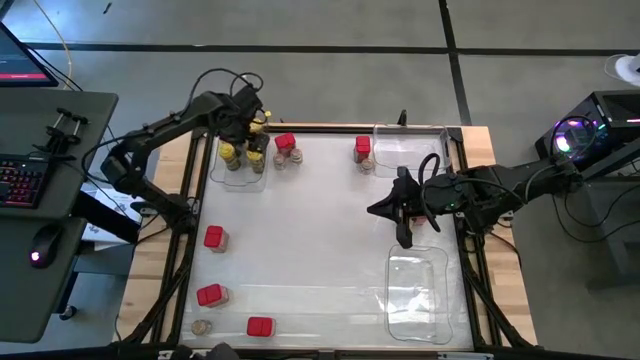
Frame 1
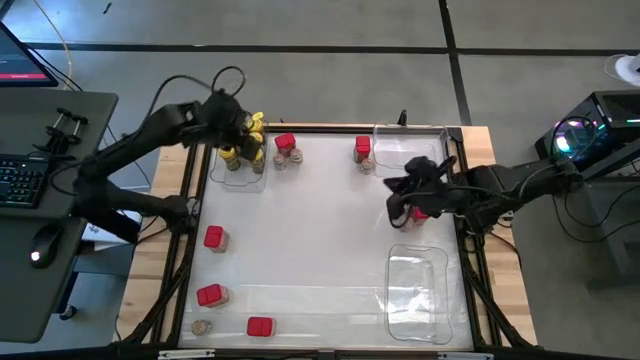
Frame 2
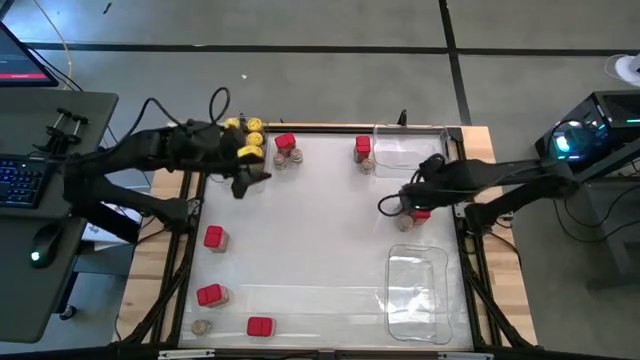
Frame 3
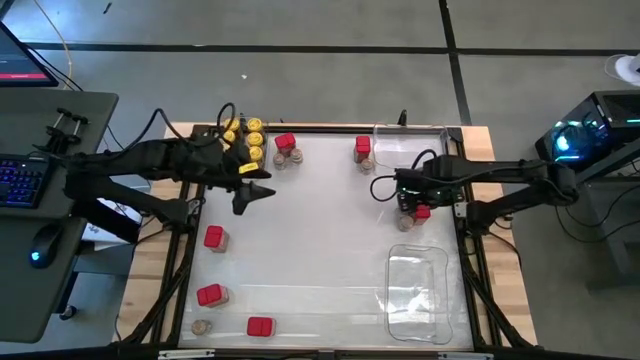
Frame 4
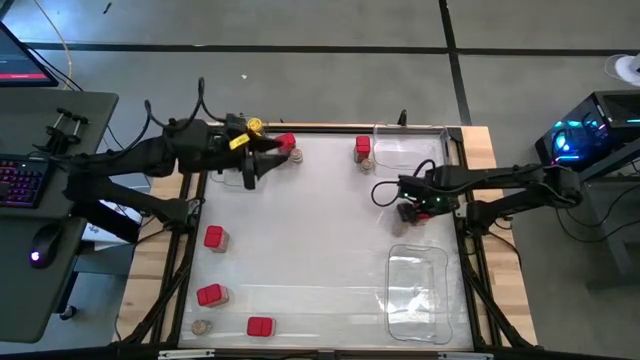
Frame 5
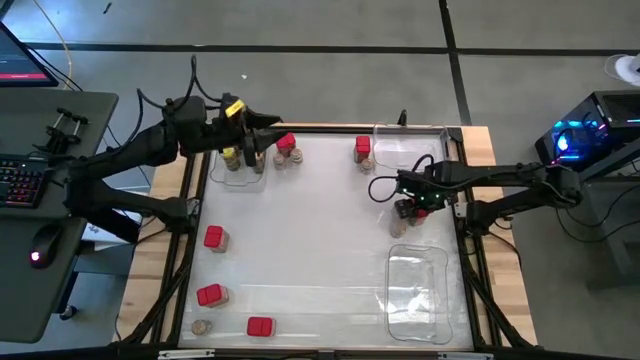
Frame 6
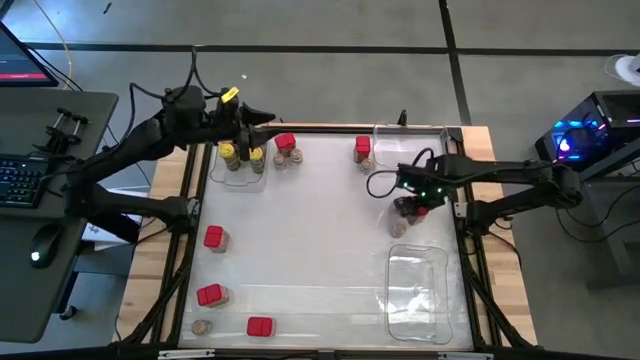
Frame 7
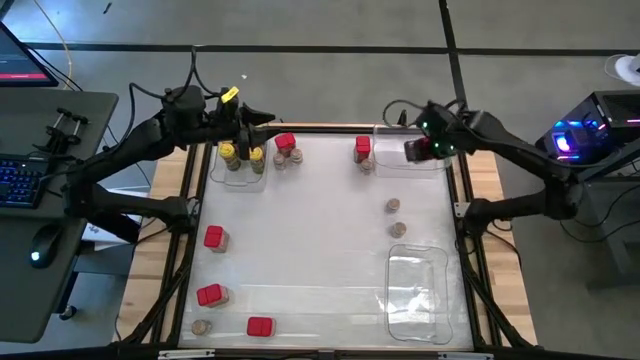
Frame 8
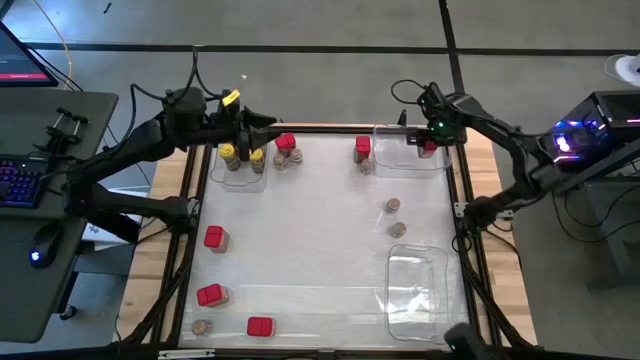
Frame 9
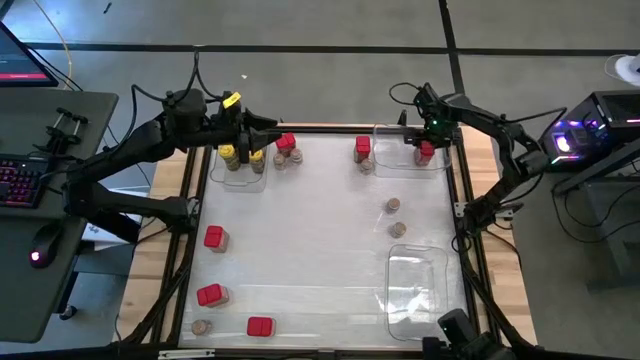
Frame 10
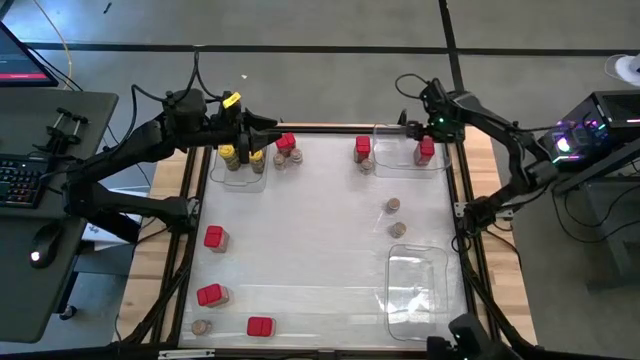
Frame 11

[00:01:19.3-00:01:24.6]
Task: Sort spices by type
Put the red seasoning can into the top right transparent bin

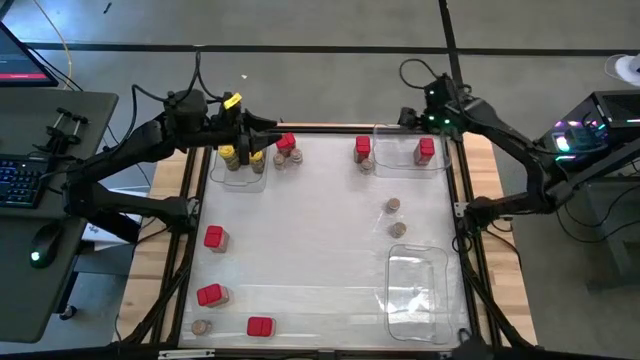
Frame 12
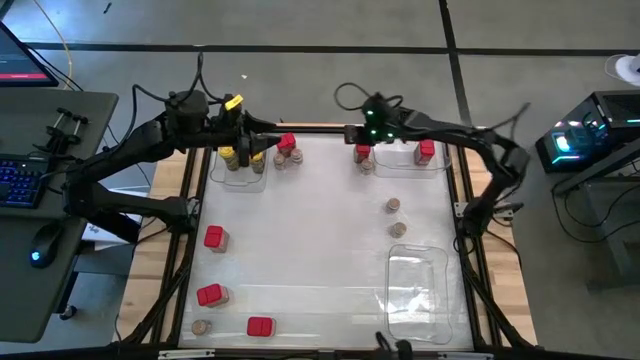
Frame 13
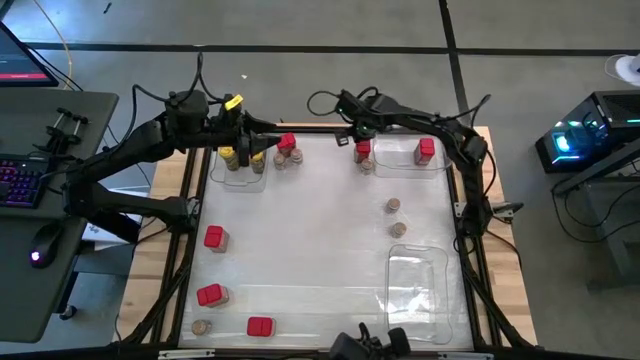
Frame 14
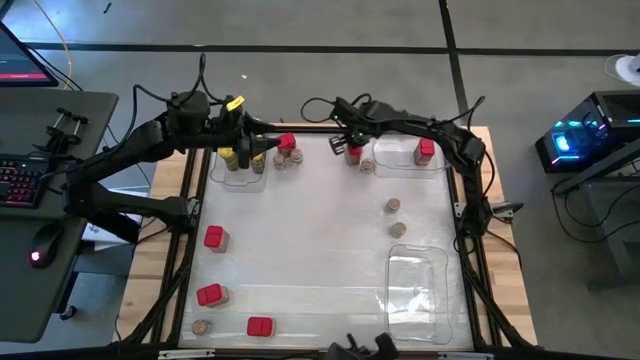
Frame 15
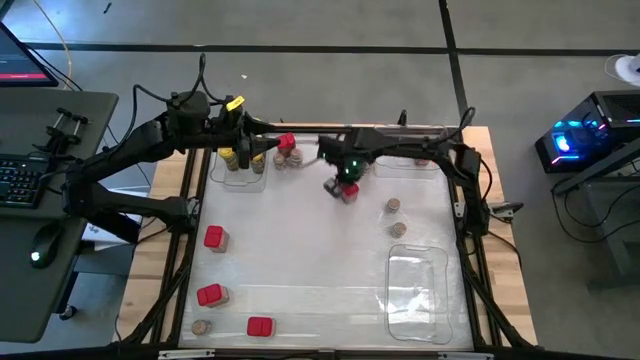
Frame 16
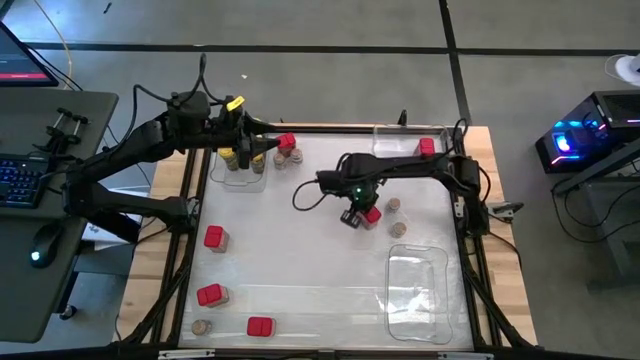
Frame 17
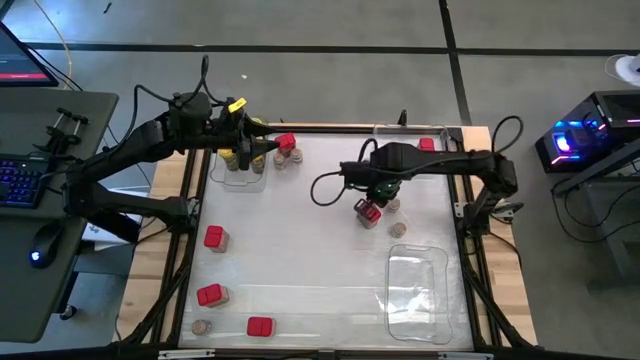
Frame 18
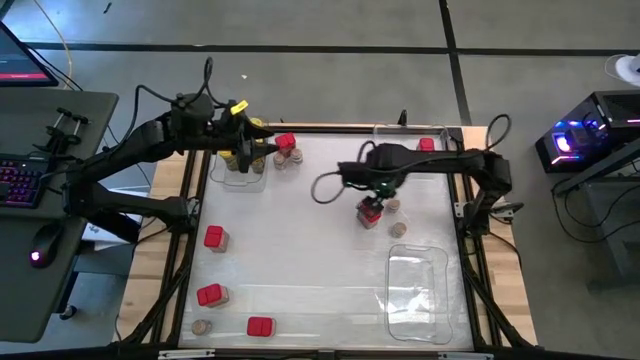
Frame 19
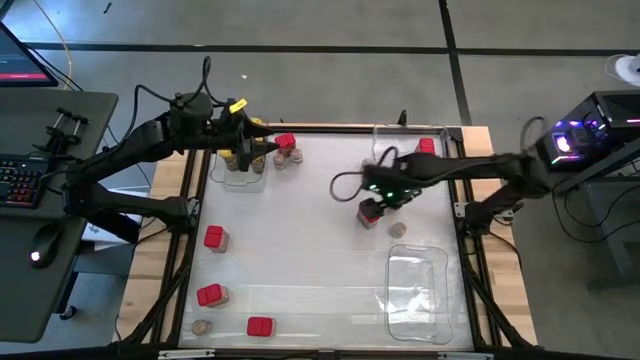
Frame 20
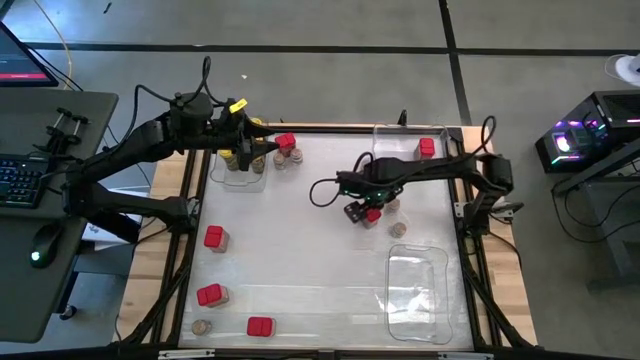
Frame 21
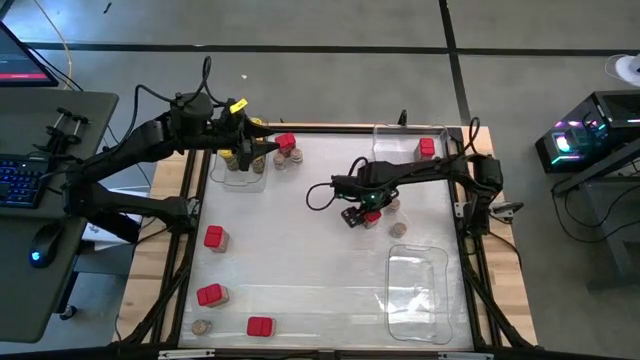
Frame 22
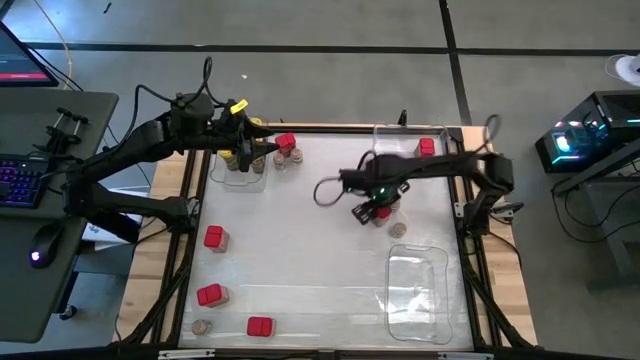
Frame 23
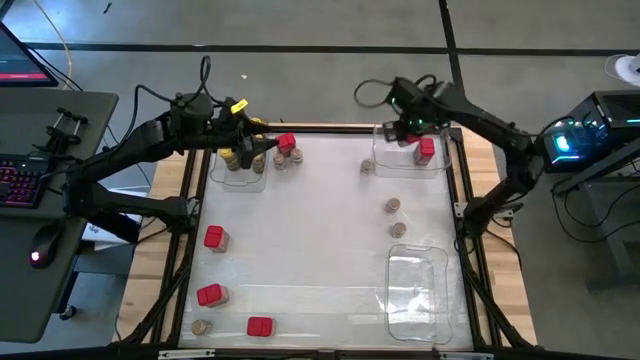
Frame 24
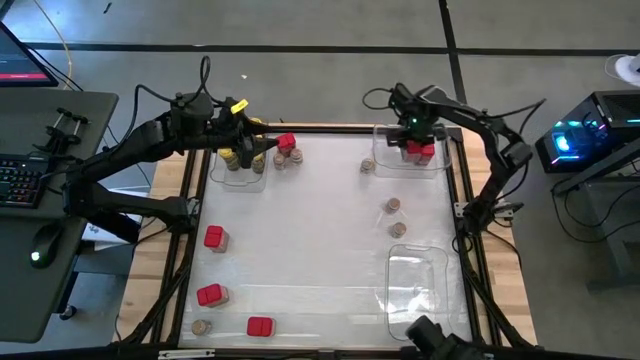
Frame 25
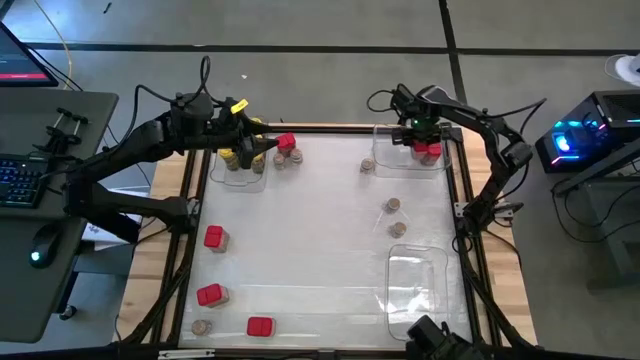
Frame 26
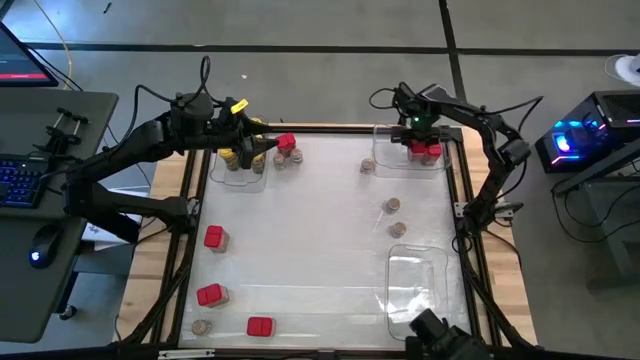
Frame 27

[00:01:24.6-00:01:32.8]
Put the red seasoning can into the top right transparent bin

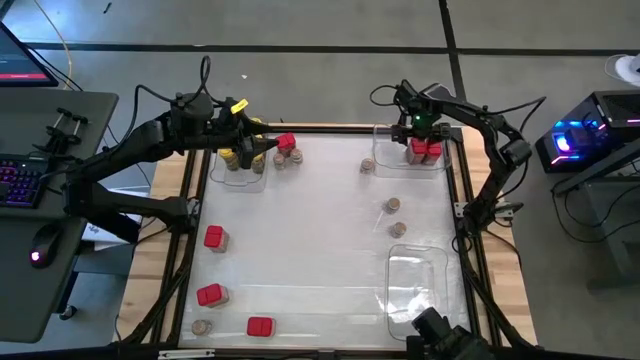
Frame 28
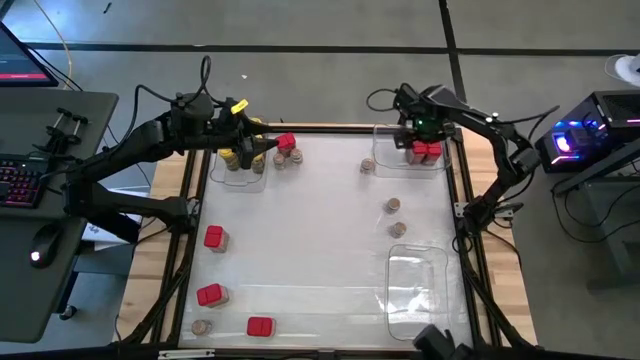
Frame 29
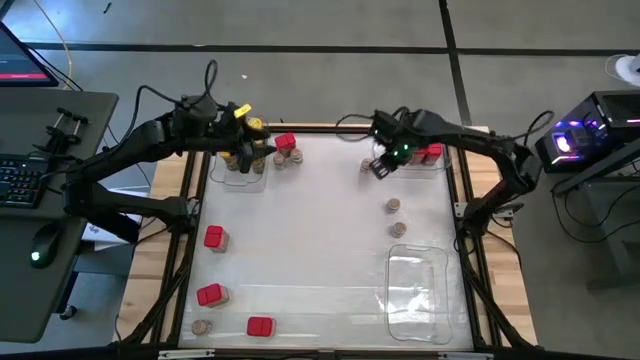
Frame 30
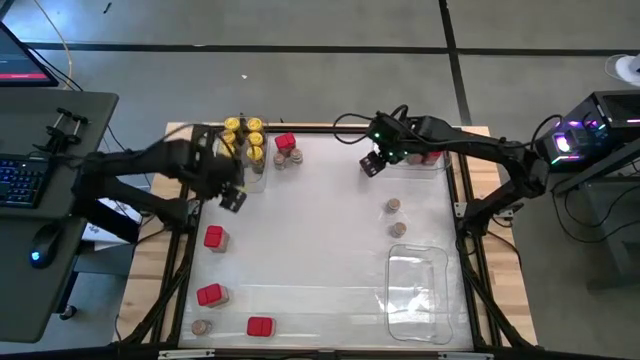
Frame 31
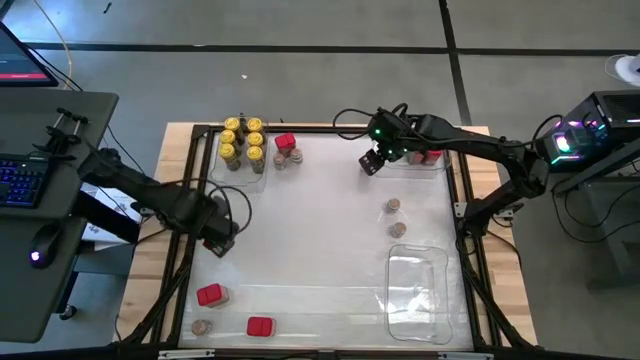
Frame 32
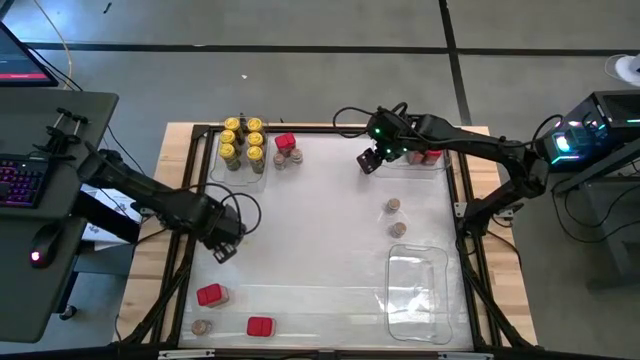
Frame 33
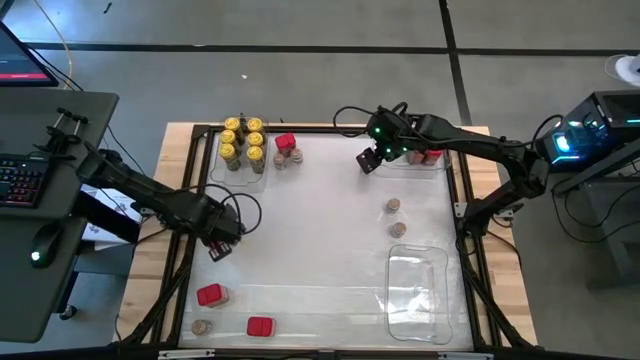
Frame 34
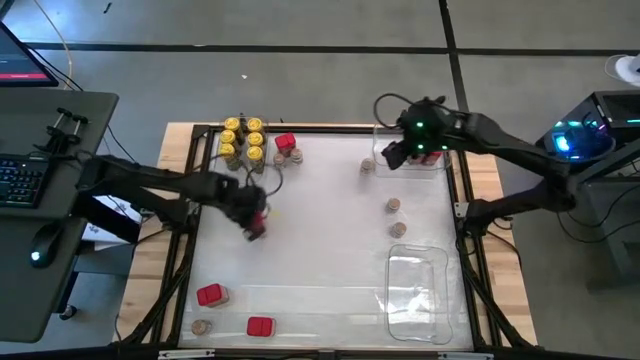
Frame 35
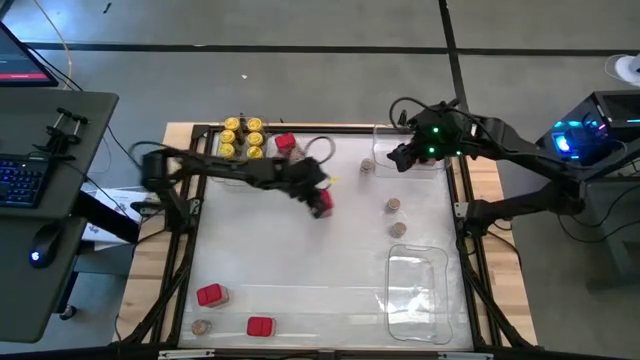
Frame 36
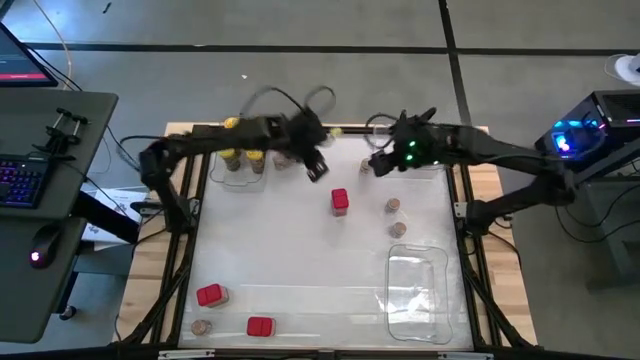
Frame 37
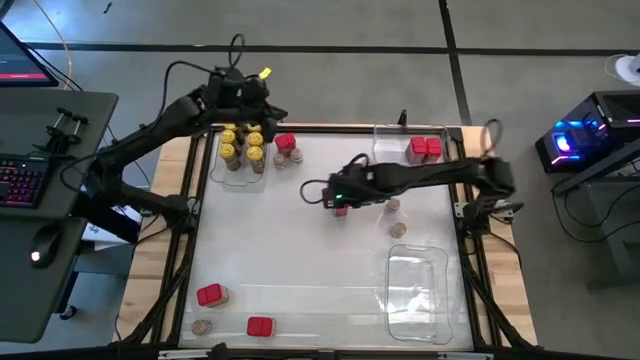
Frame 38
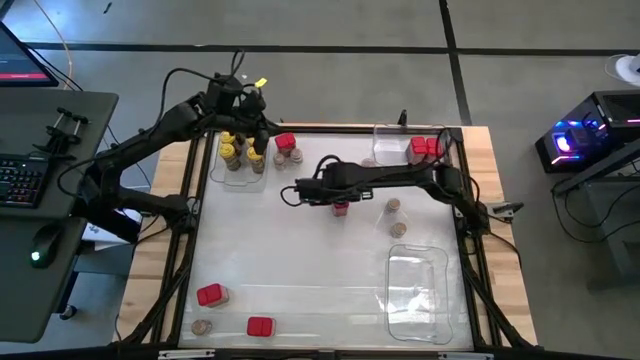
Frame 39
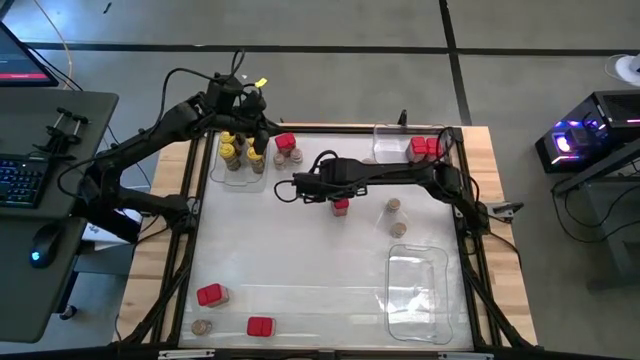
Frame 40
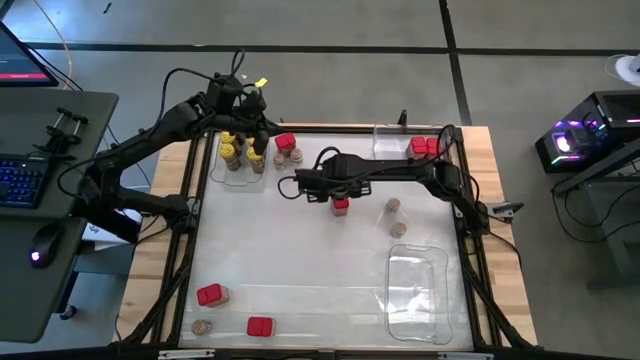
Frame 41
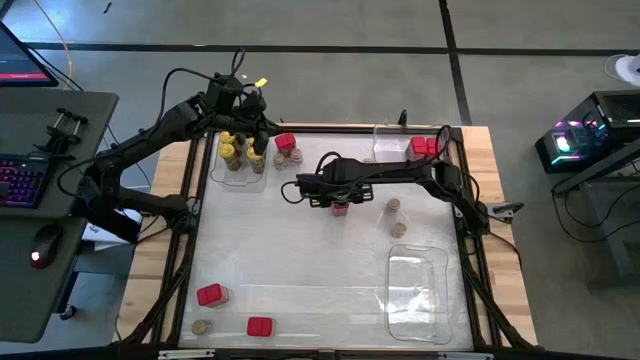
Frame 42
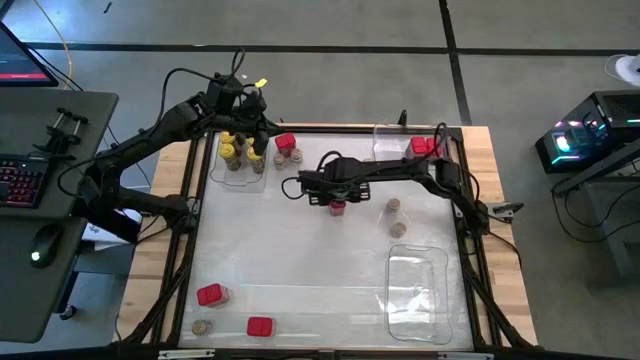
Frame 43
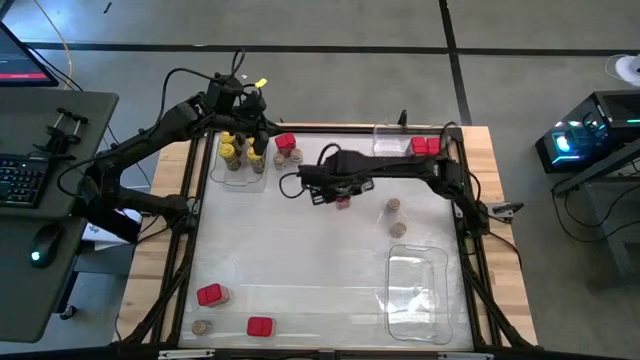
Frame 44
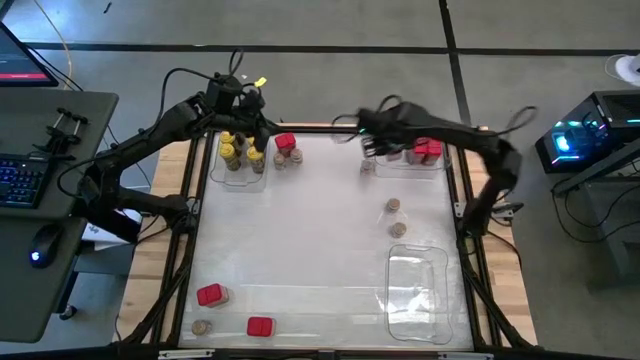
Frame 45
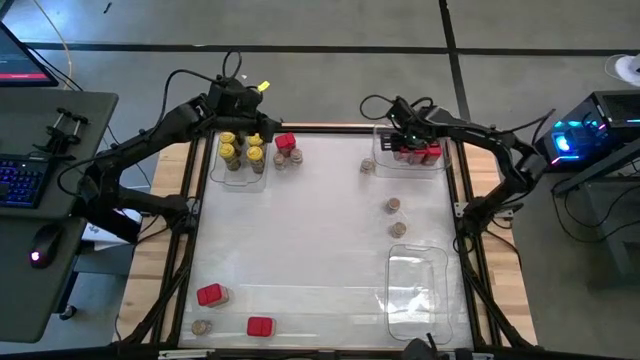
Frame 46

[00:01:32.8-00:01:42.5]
Put the red seasoning can into the top right transparent bin
